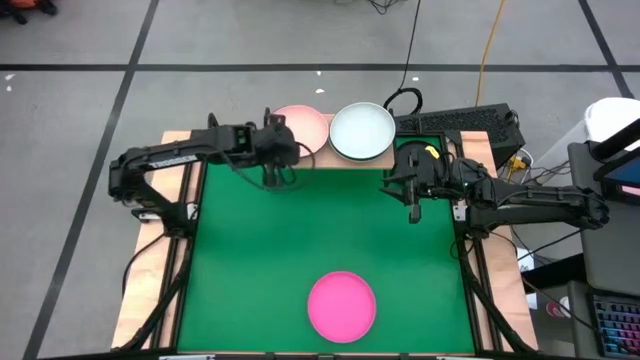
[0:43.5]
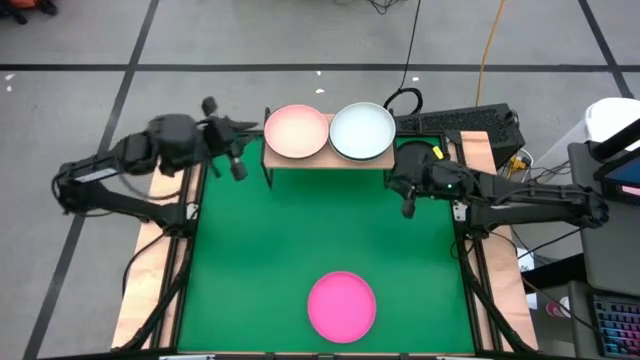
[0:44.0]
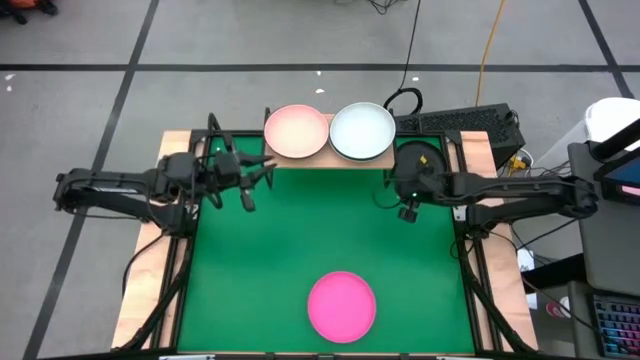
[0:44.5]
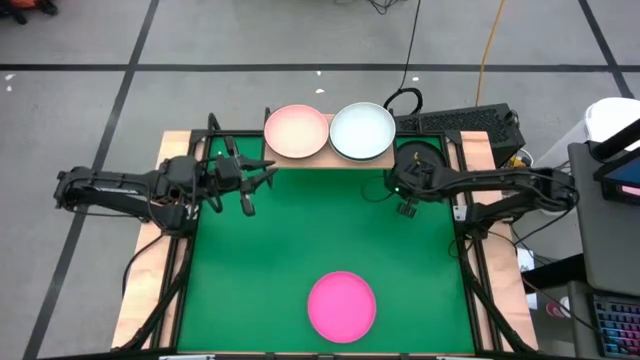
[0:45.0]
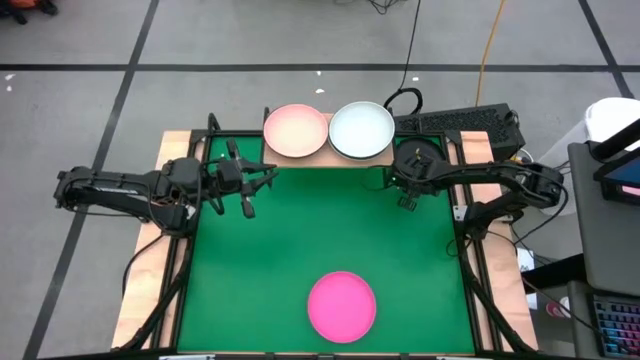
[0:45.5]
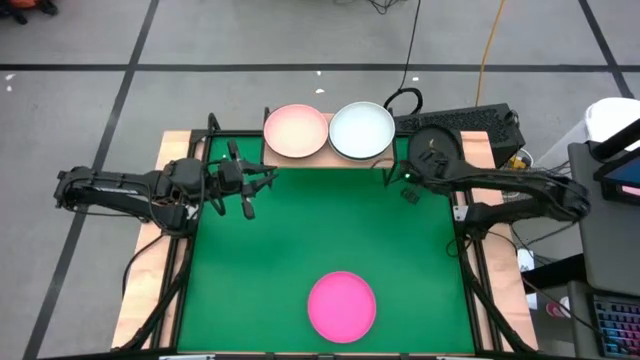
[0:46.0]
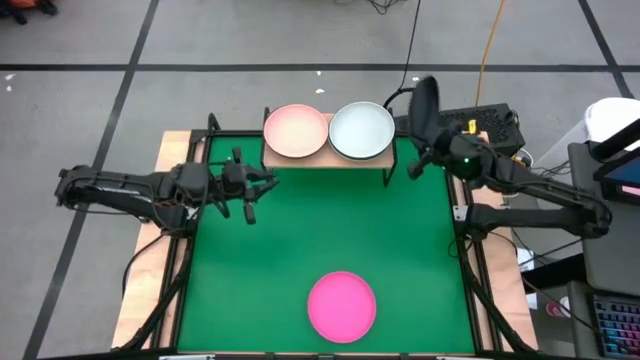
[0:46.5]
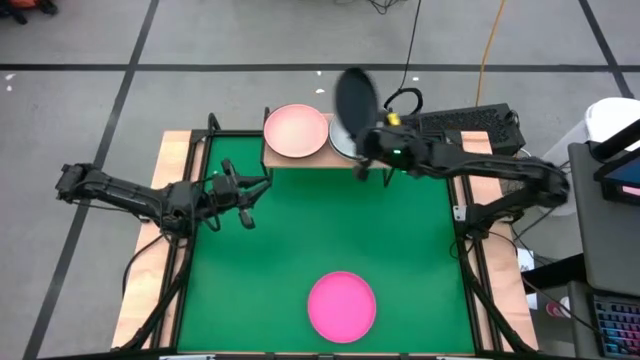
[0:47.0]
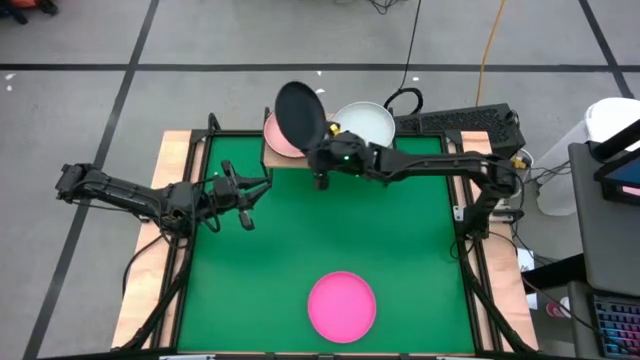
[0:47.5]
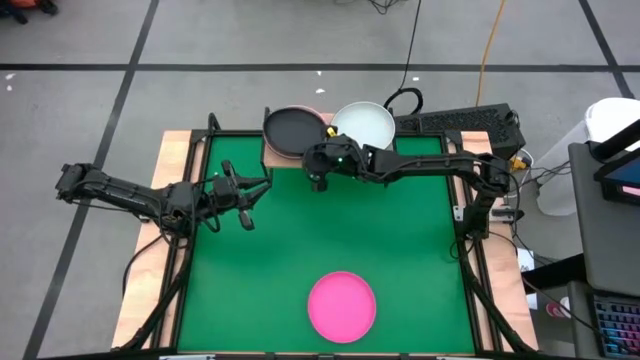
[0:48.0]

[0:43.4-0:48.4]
Task: Place and stack plates onto a shelf
Stack the black plate on top of the light brown plate on the shelf

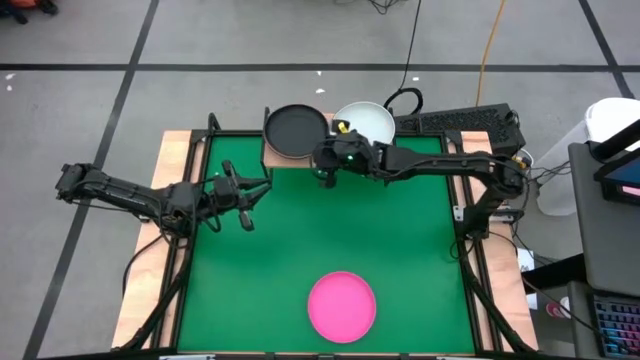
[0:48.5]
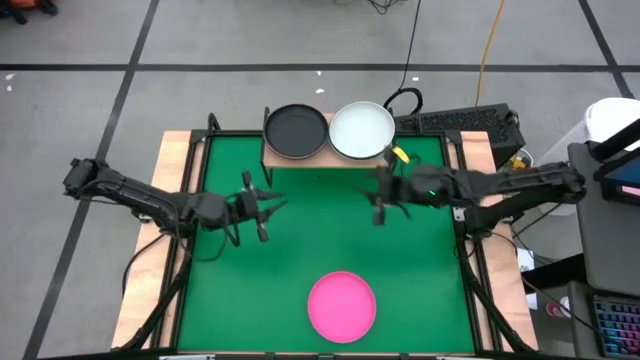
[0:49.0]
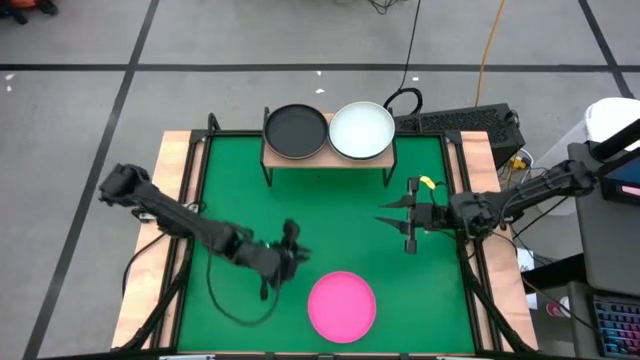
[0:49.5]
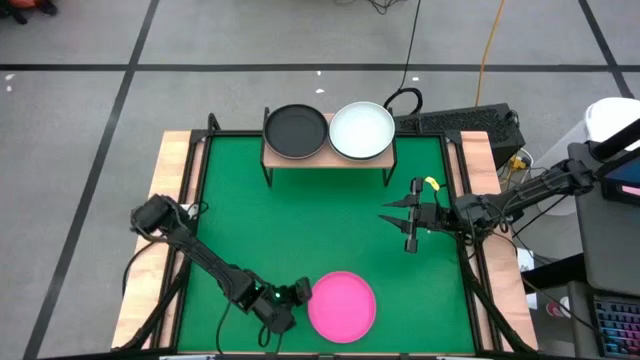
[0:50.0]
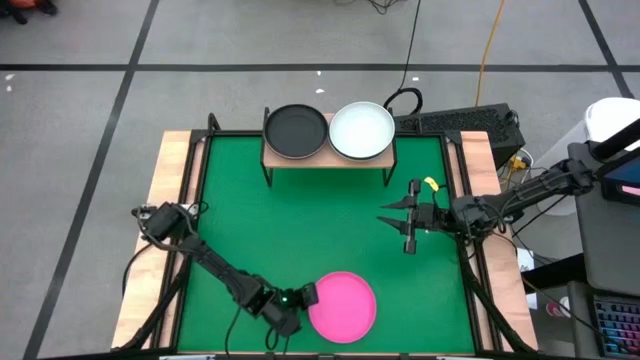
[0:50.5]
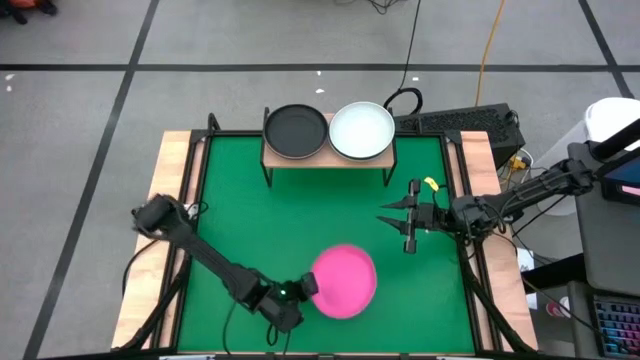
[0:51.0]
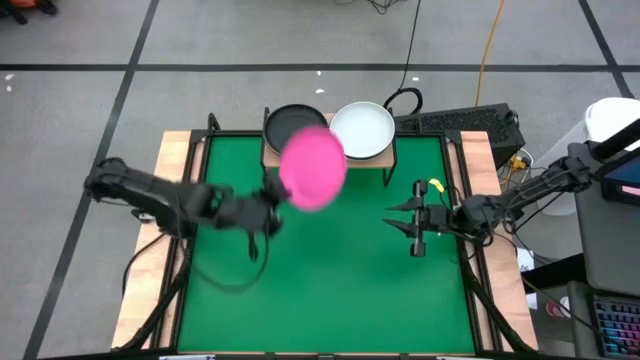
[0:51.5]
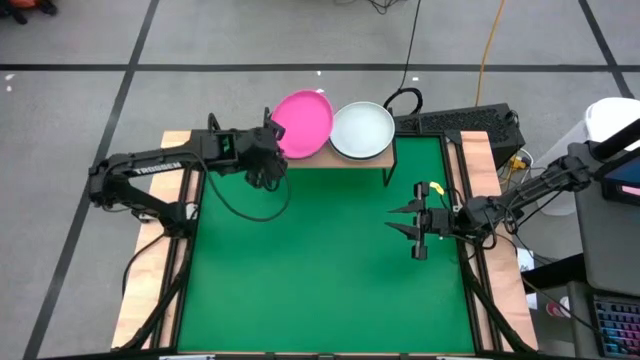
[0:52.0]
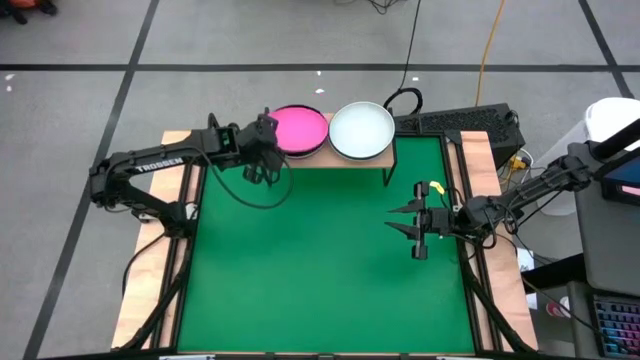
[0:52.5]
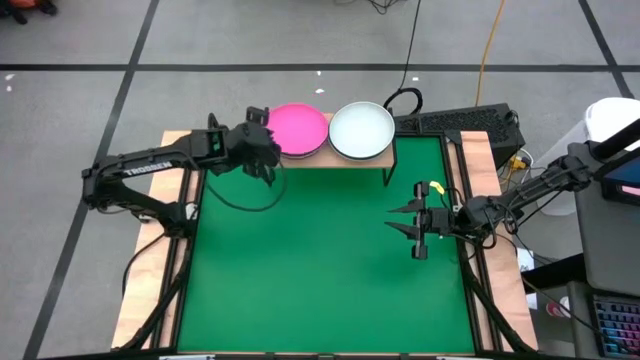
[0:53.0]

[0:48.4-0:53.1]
Stack the pink plate on top of the black plate on the shelf

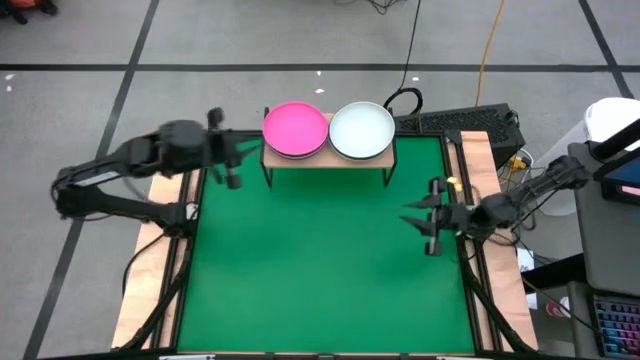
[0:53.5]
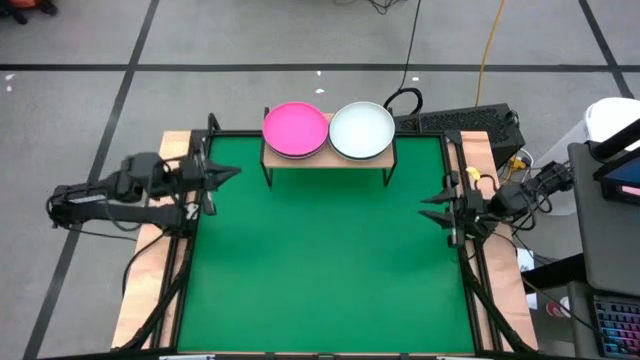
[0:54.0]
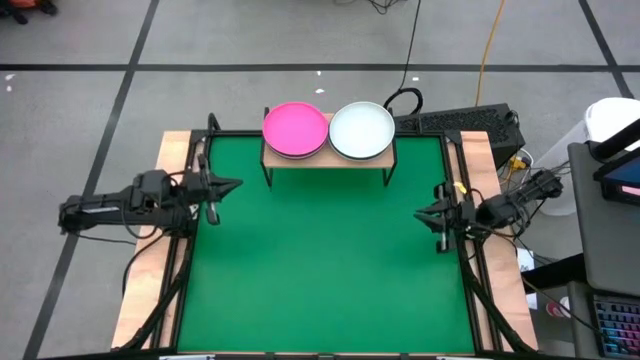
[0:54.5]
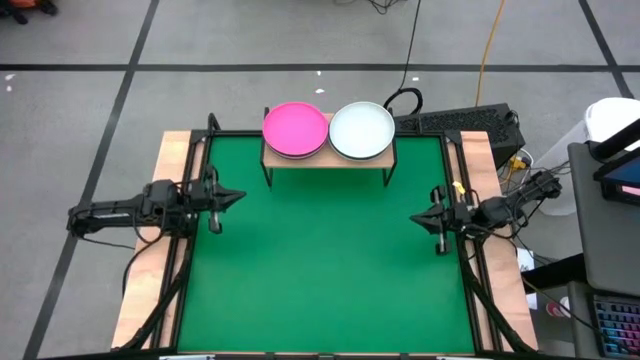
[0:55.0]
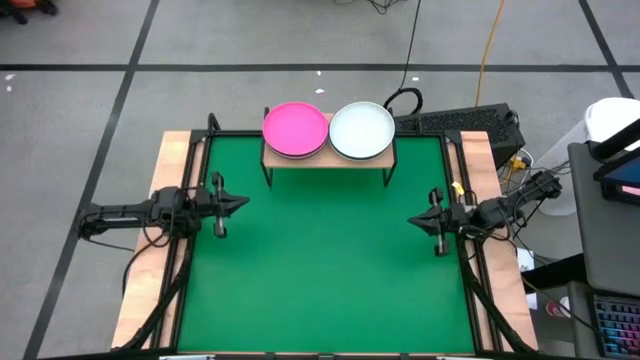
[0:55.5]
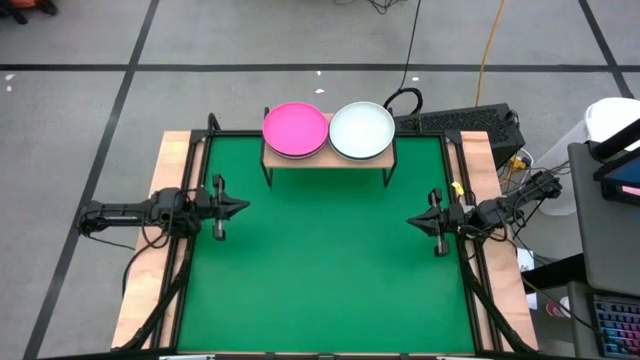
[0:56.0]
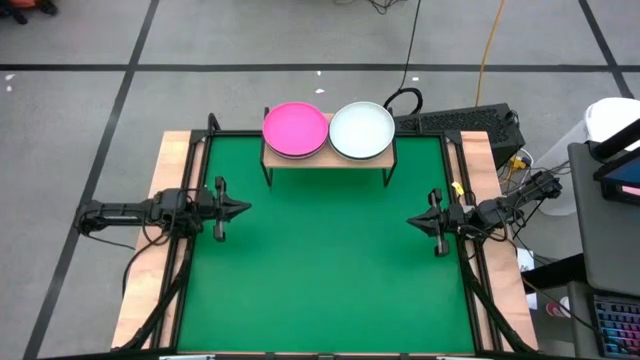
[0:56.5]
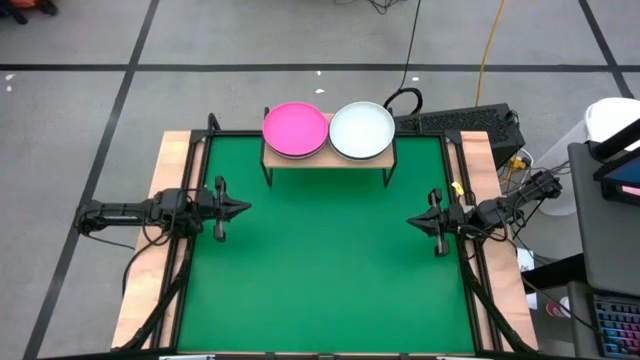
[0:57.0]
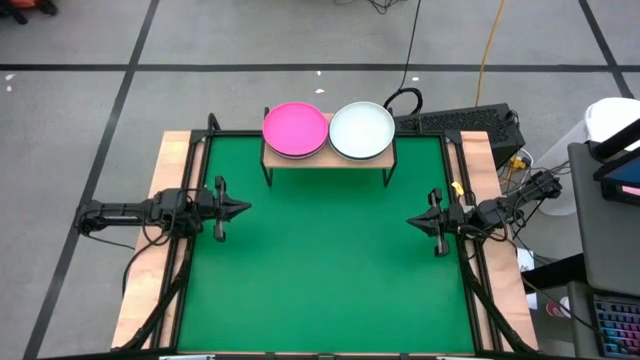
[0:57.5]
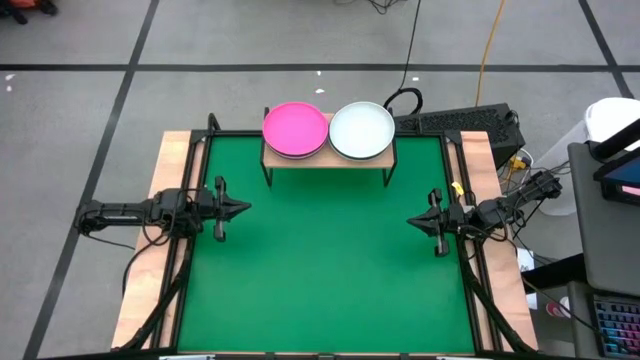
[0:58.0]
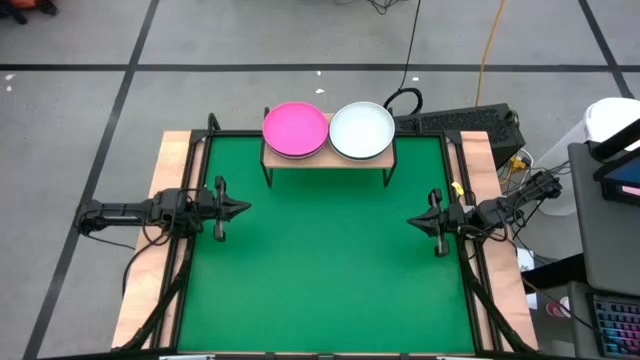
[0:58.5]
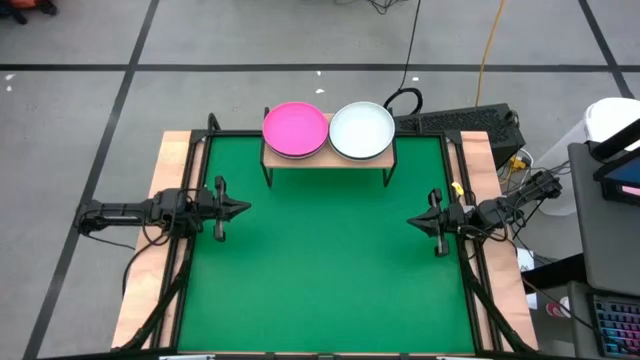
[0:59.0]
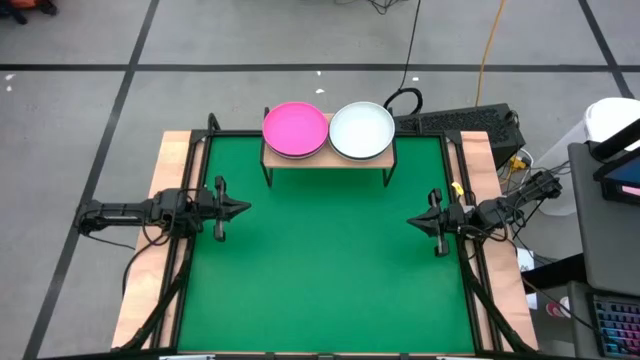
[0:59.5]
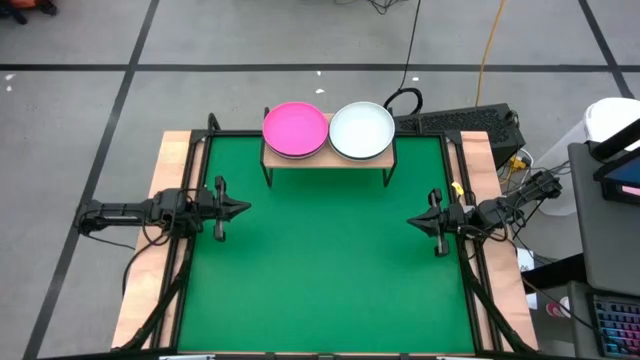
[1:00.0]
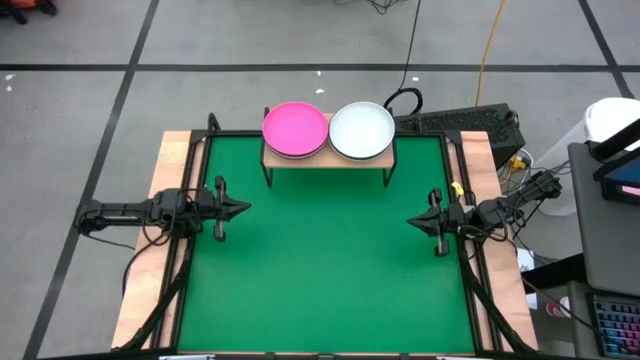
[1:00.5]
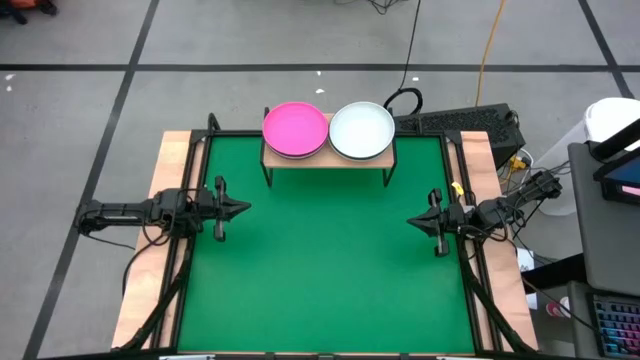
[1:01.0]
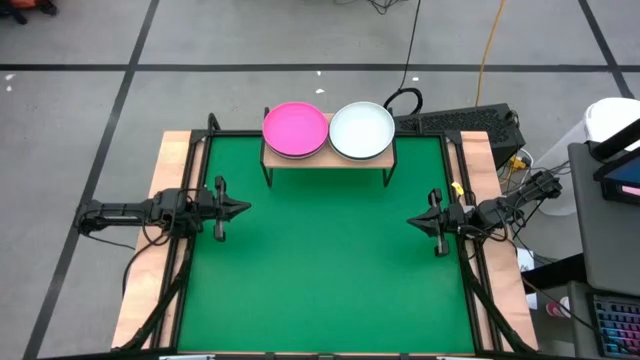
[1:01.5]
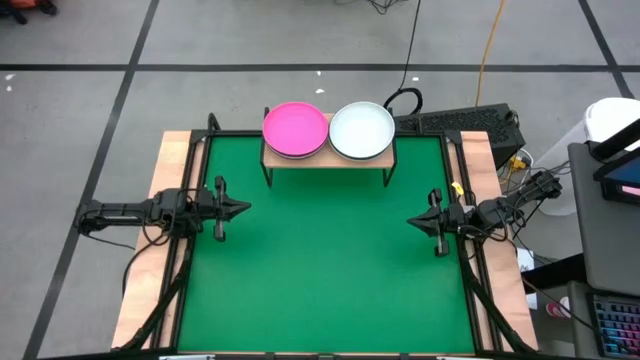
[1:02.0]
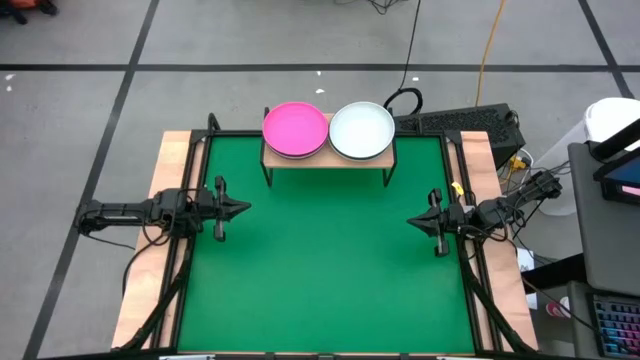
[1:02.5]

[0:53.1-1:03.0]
Return to Home Position

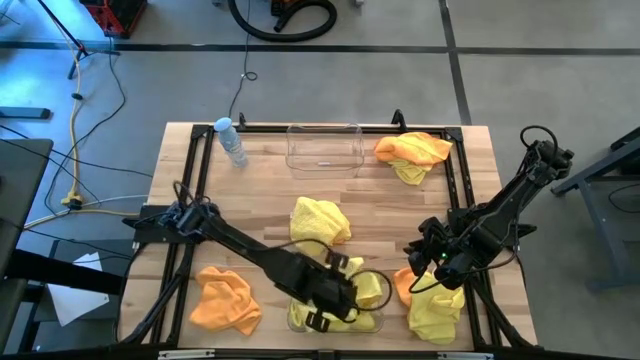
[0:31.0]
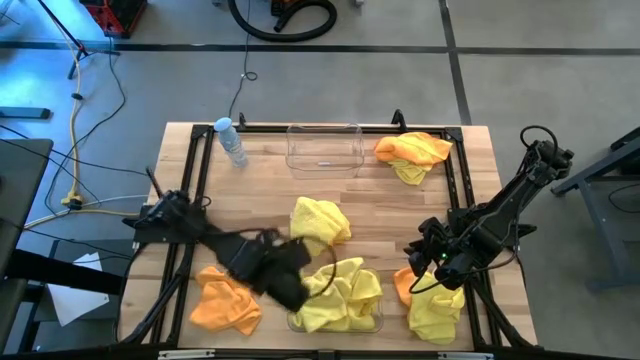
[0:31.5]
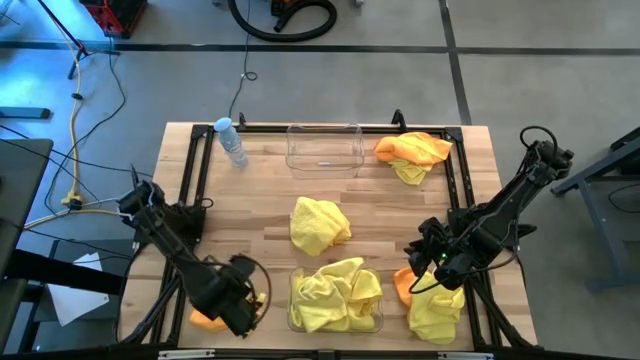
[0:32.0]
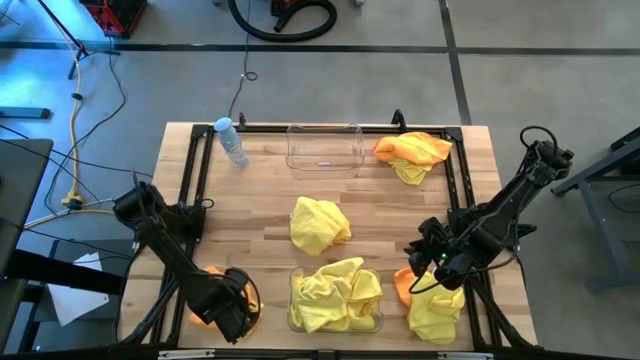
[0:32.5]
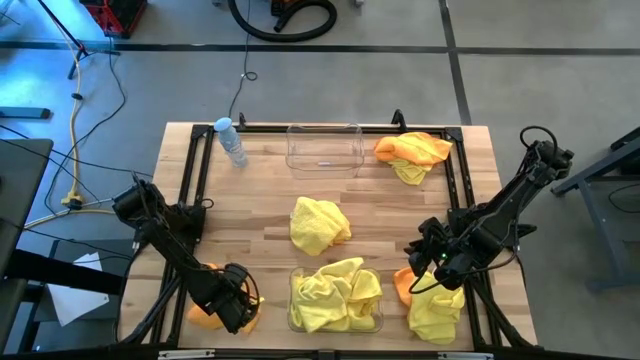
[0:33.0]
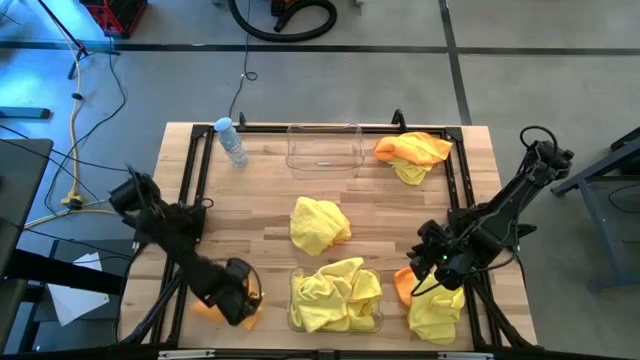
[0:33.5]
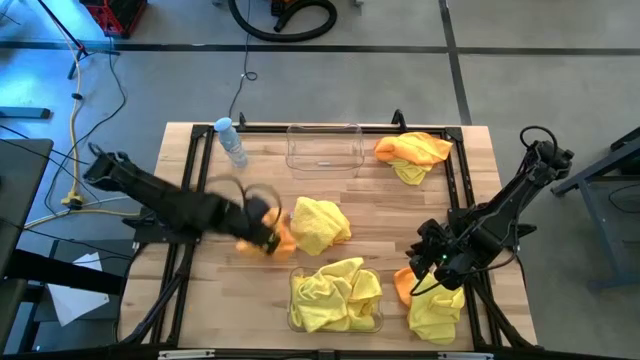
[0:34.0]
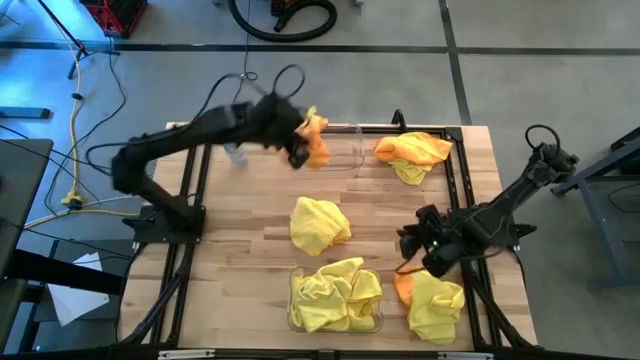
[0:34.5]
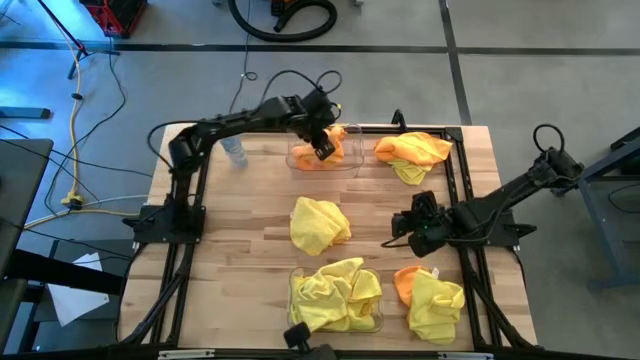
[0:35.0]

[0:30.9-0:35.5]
Task: Sort microfiber towel by color & place in baskets
Put the orange microfiber towel into the top transparent bin
